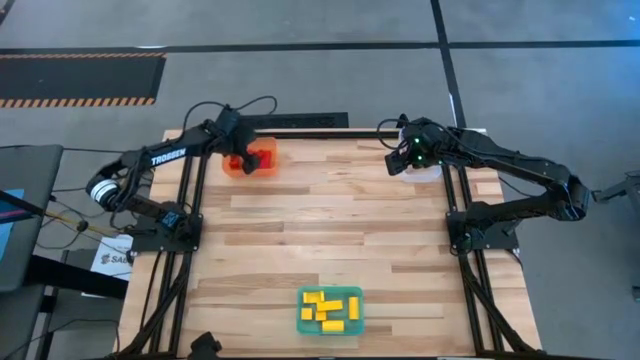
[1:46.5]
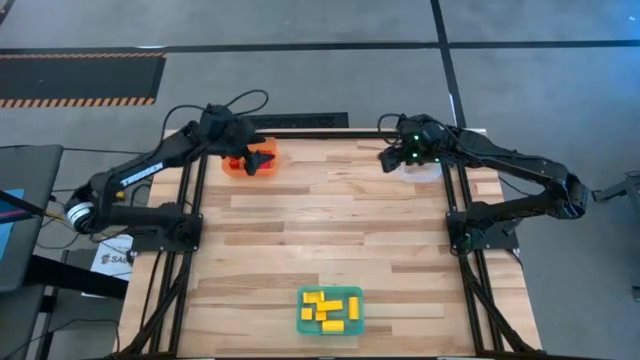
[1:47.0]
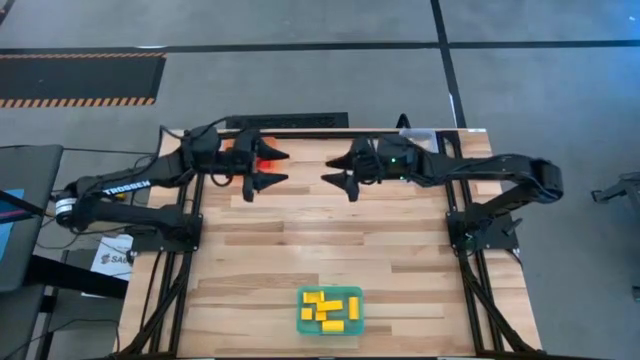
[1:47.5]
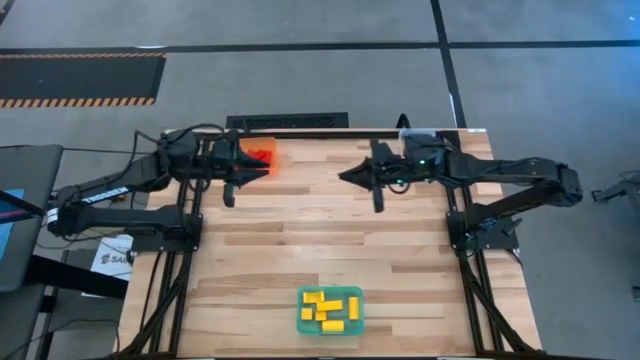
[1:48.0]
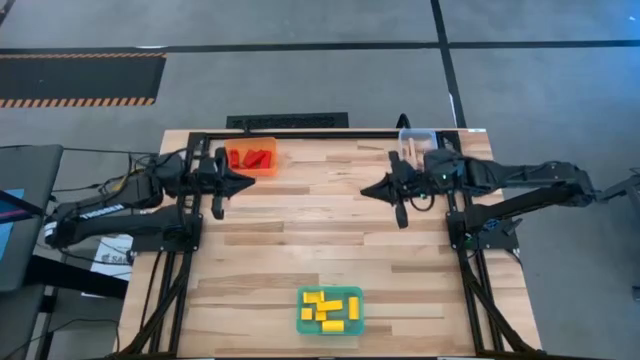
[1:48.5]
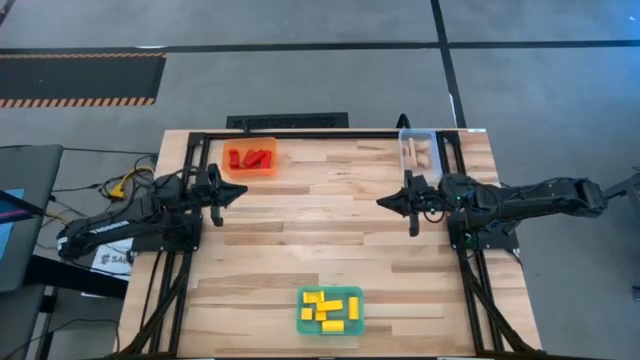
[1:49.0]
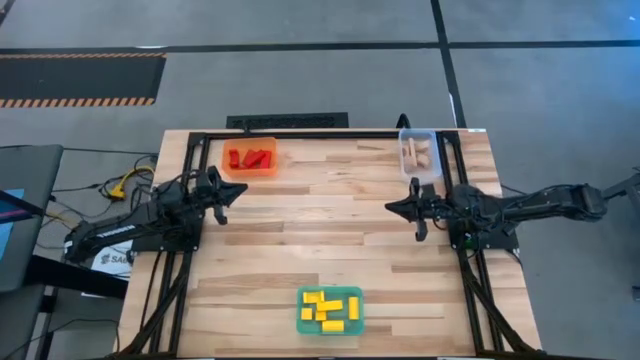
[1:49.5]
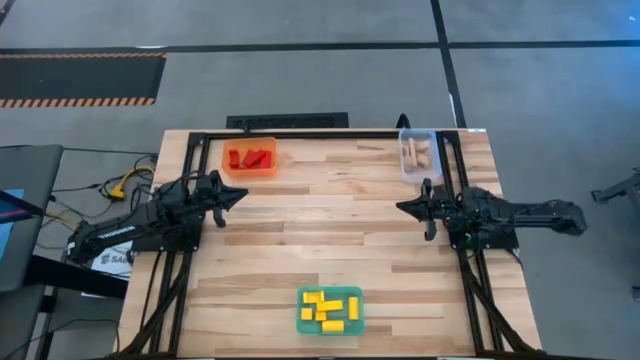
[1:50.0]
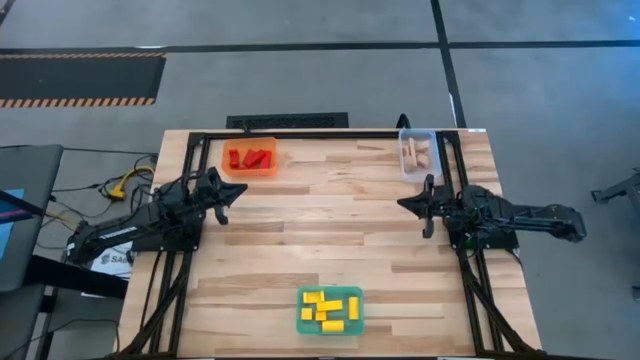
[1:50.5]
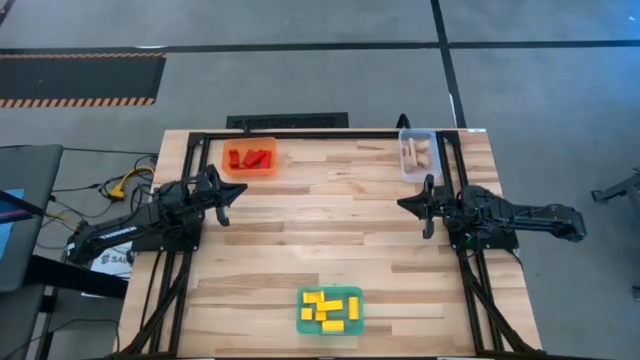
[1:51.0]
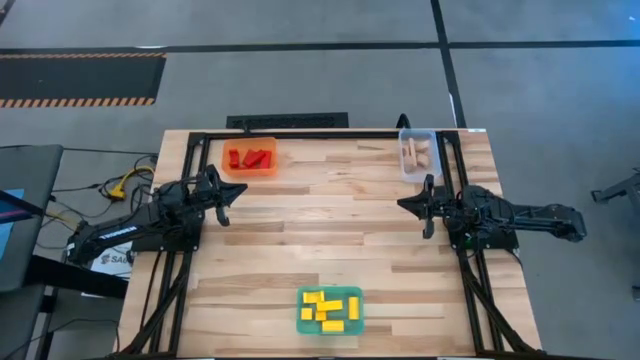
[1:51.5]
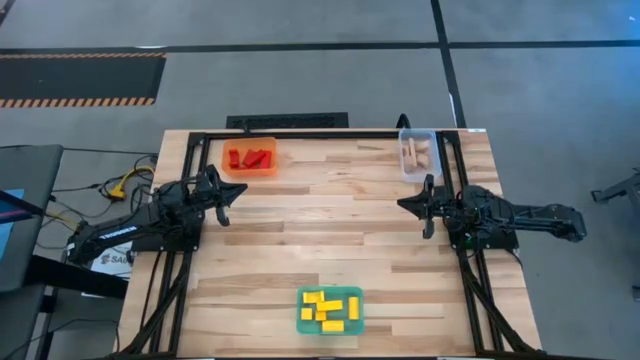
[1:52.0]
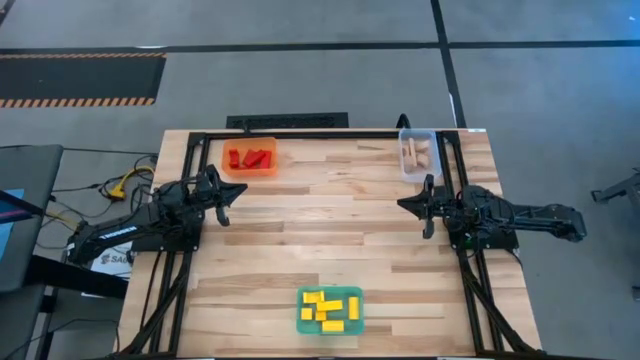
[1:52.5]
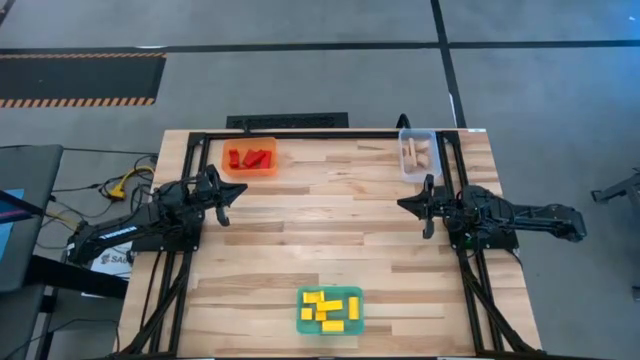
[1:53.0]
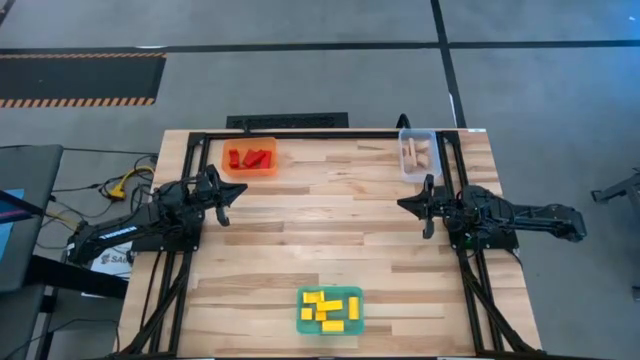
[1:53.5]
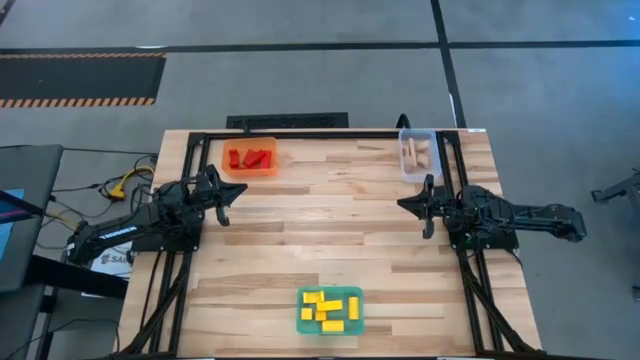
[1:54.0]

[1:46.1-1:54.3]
Task: Sort & place blocks by color
Return to Home Position

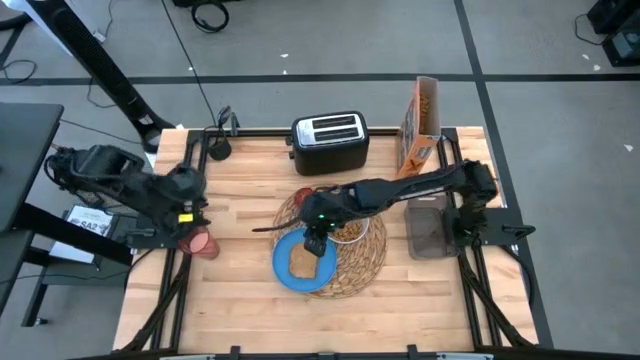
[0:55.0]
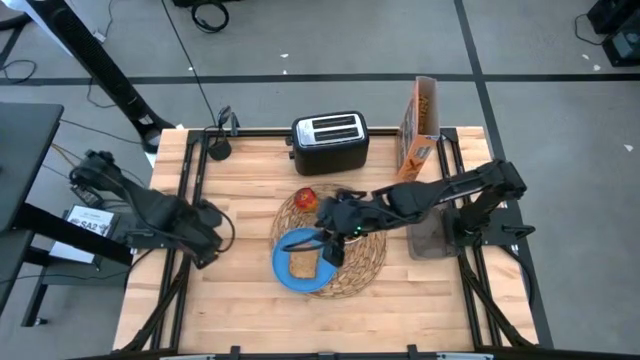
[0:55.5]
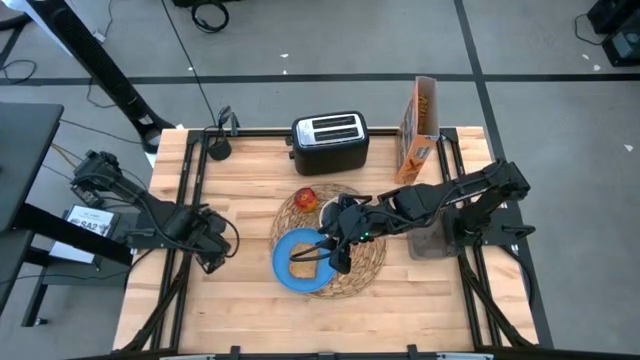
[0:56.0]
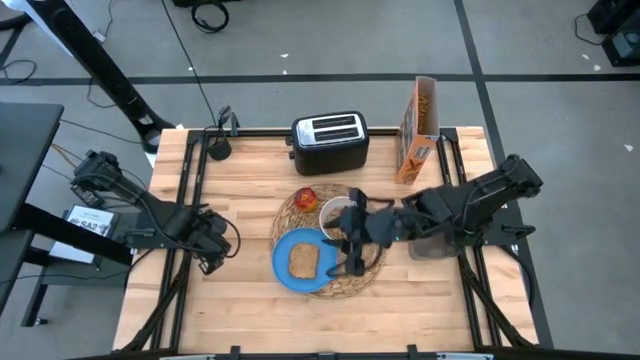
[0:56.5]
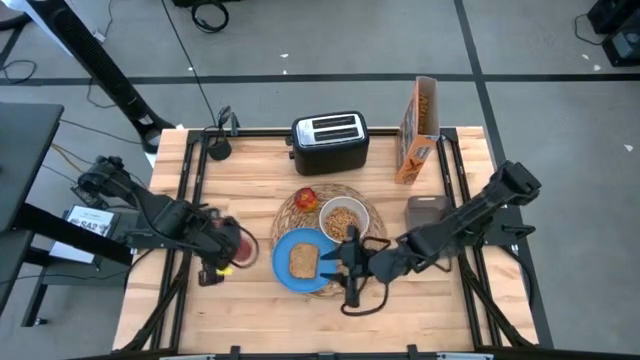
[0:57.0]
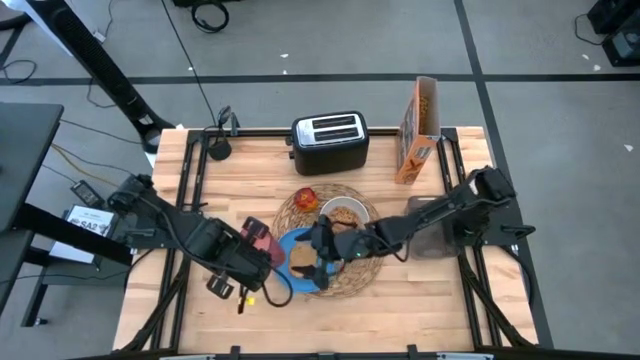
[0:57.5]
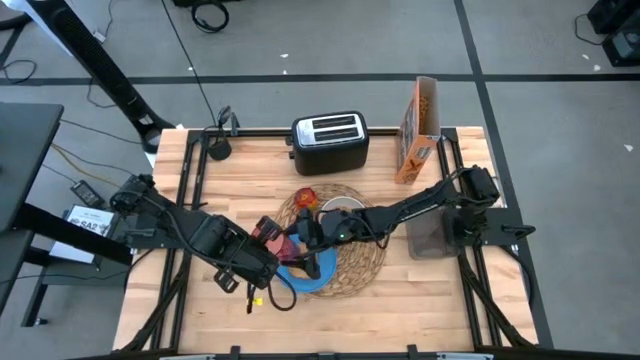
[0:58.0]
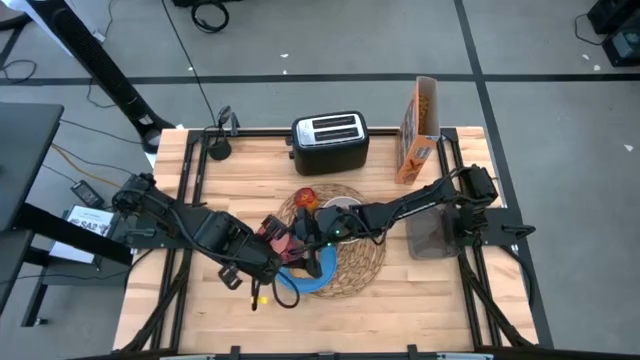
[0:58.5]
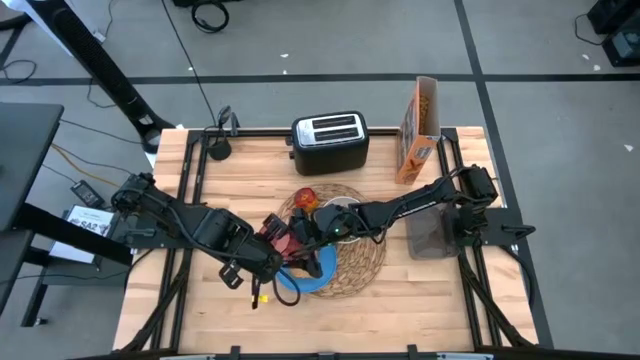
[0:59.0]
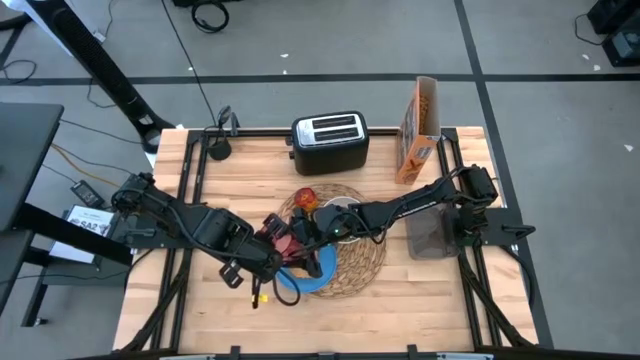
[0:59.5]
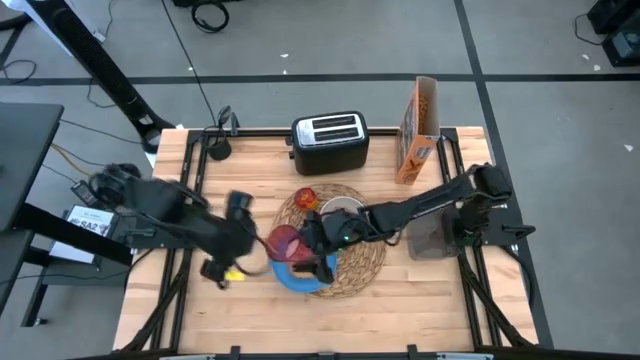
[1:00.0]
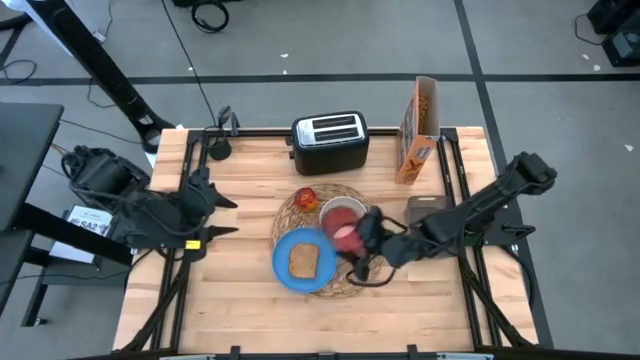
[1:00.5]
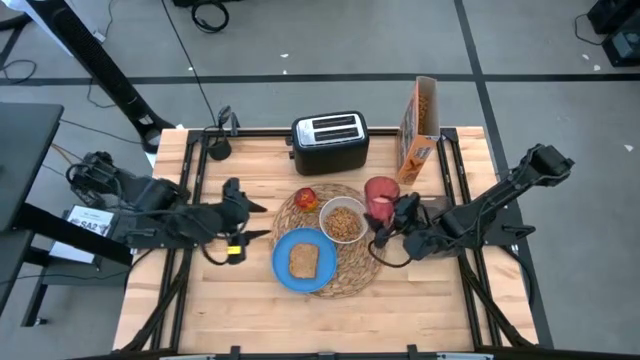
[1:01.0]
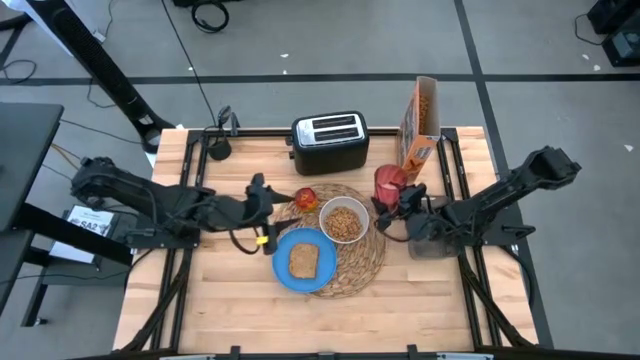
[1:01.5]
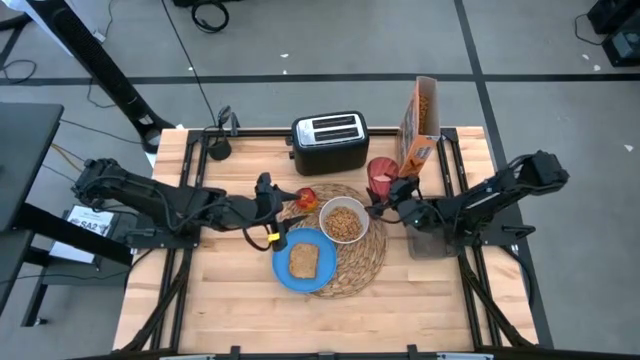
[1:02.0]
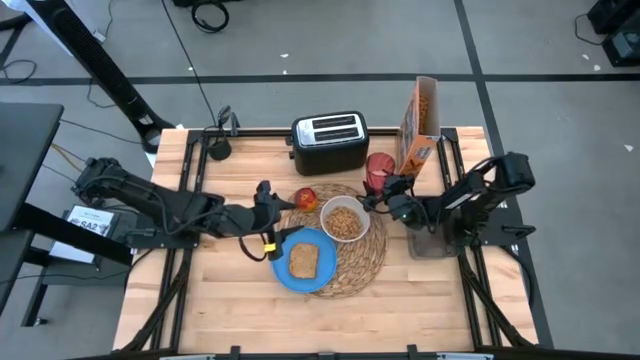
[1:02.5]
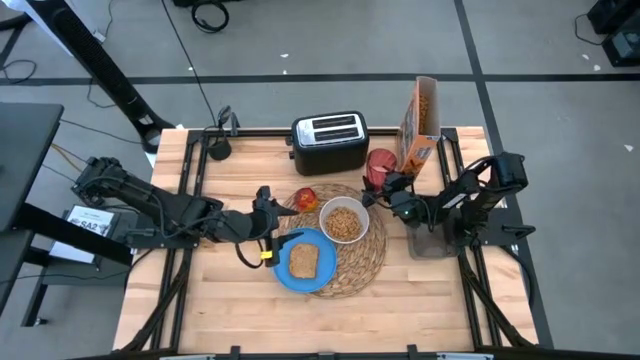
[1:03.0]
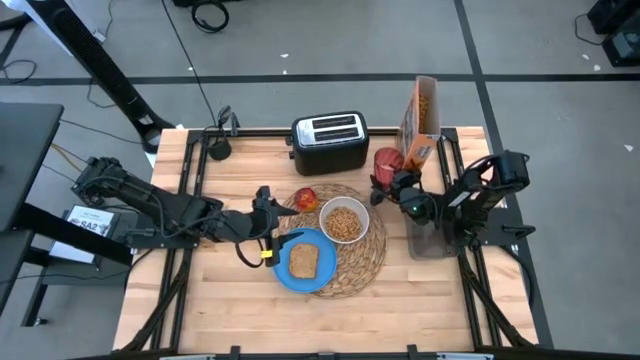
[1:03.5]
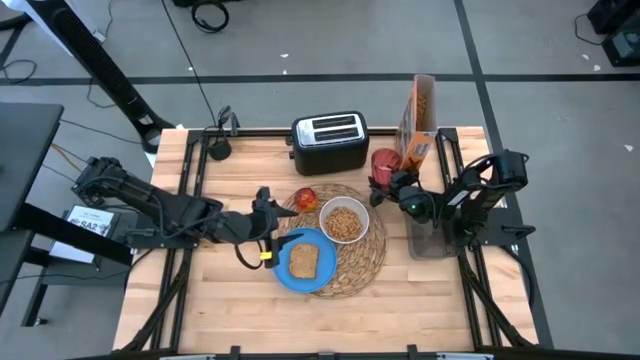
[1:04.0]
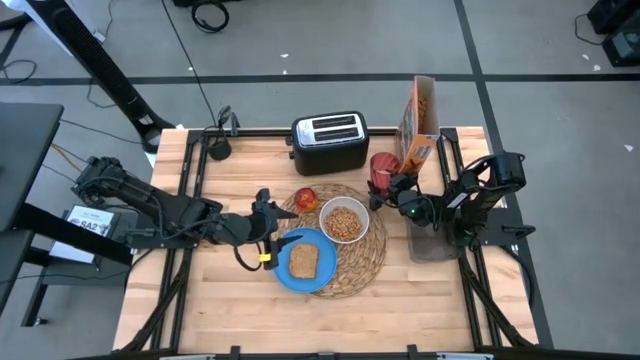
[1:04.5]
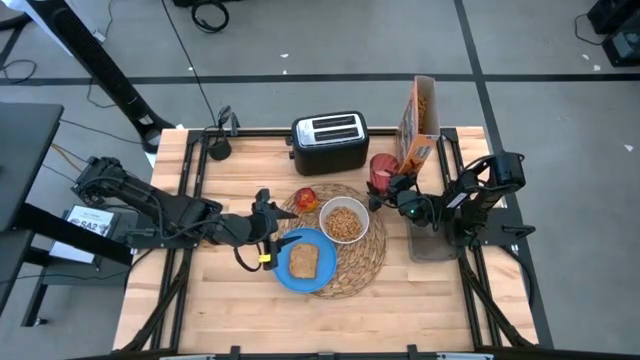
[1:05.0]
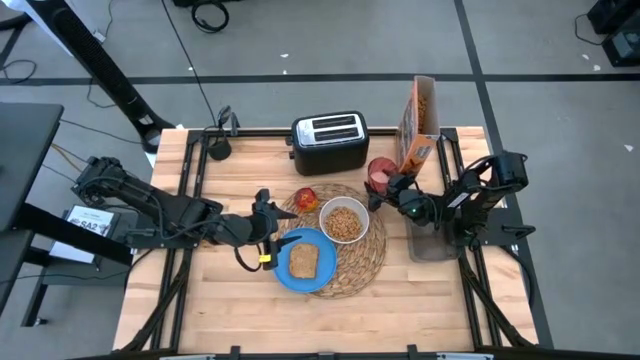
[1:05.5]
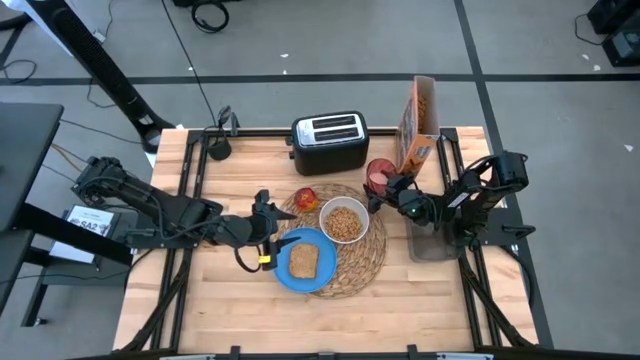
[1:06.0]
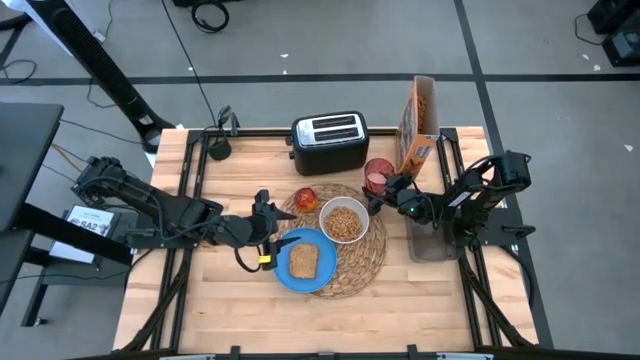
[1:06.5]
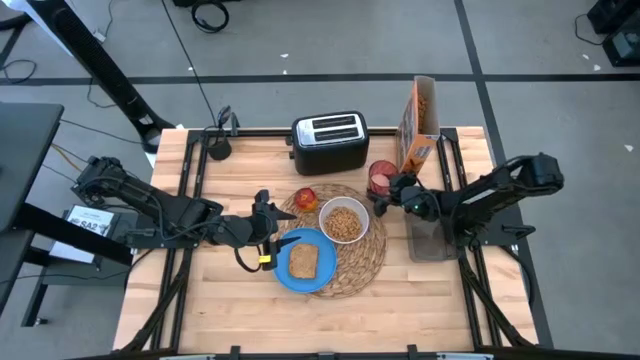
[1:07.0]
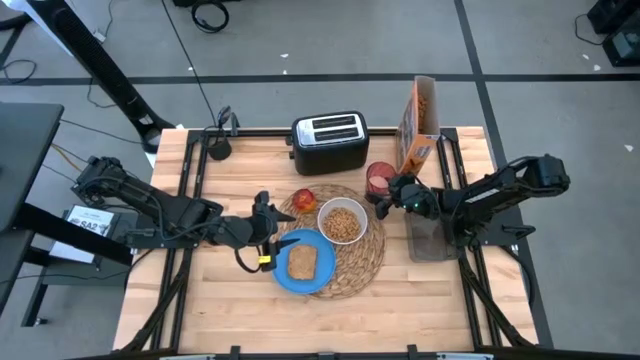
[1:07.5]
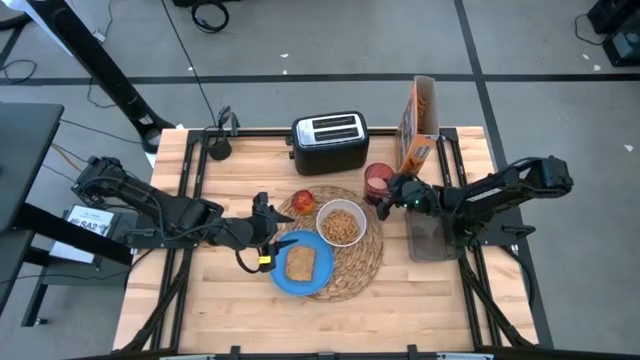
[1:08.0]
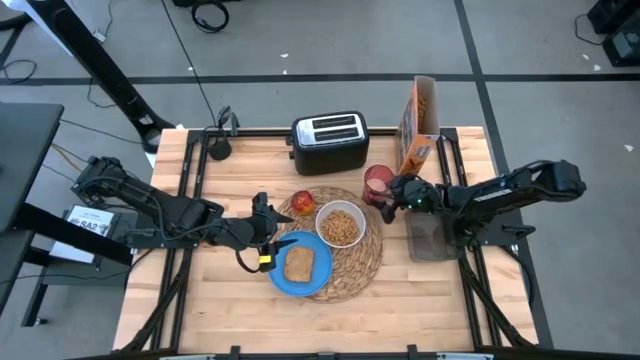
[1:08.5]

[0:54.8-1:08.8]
Task: Arrange a breakfast setting
Put the red cup to the top right of the brown table mat
